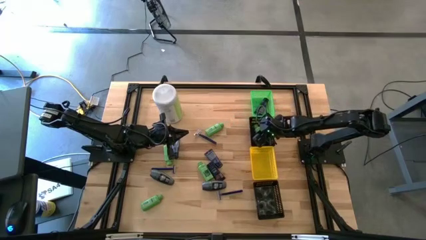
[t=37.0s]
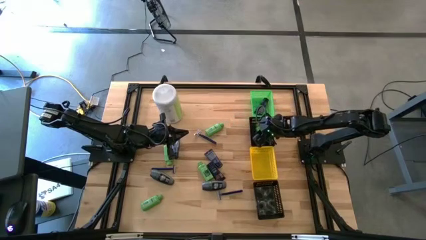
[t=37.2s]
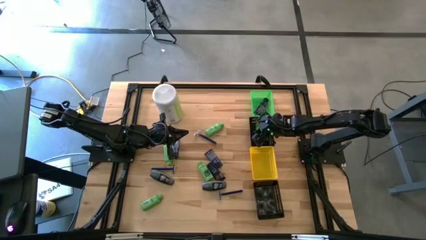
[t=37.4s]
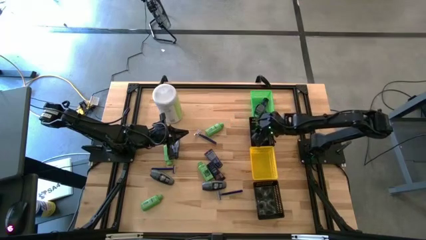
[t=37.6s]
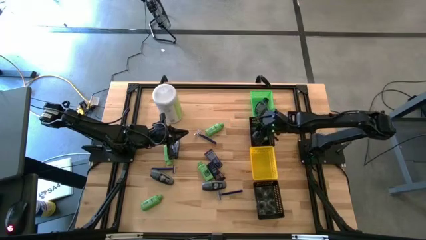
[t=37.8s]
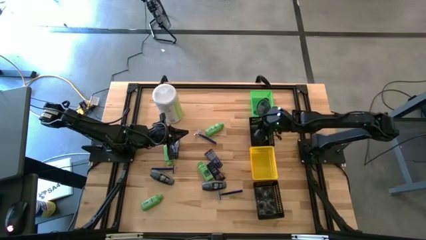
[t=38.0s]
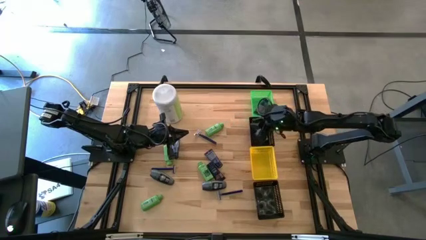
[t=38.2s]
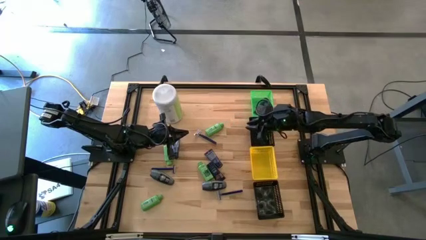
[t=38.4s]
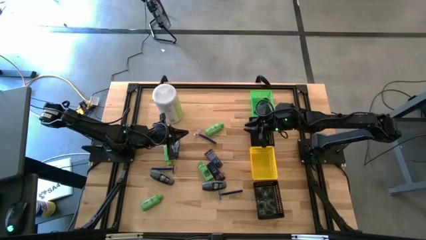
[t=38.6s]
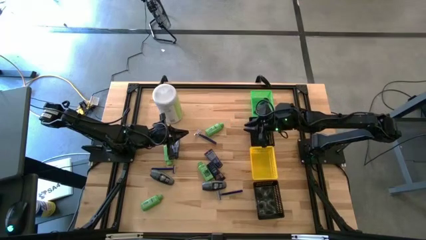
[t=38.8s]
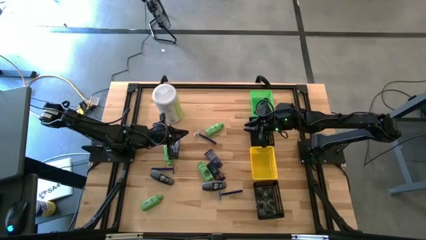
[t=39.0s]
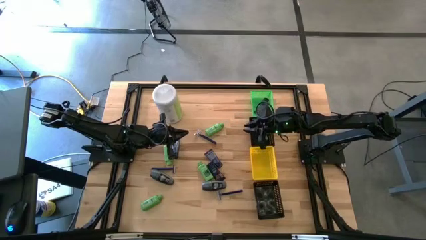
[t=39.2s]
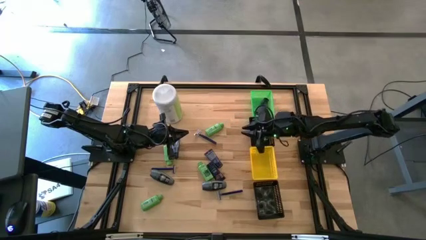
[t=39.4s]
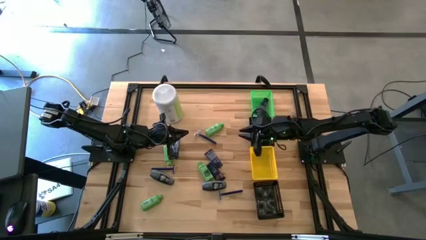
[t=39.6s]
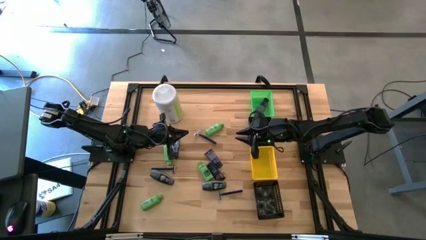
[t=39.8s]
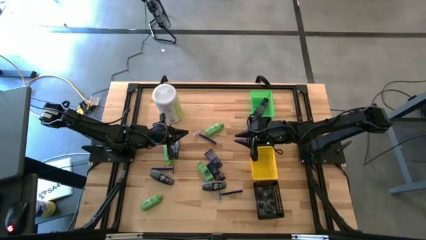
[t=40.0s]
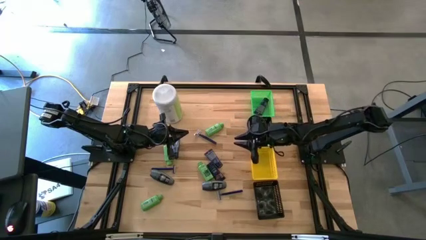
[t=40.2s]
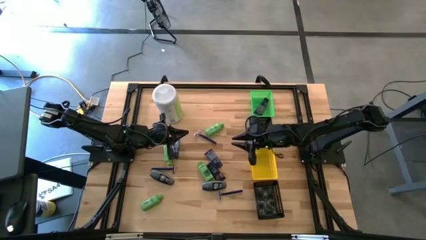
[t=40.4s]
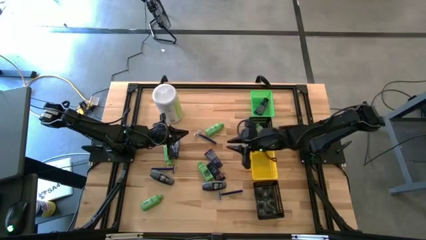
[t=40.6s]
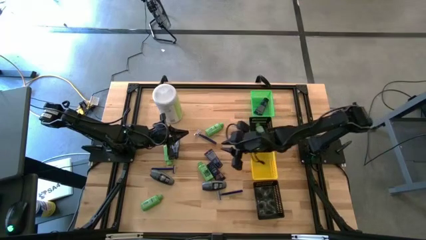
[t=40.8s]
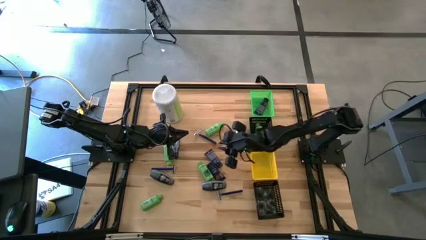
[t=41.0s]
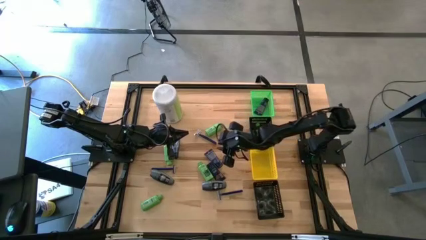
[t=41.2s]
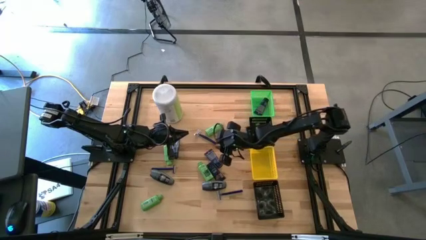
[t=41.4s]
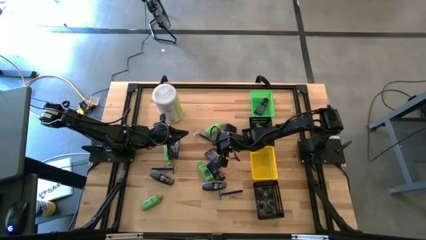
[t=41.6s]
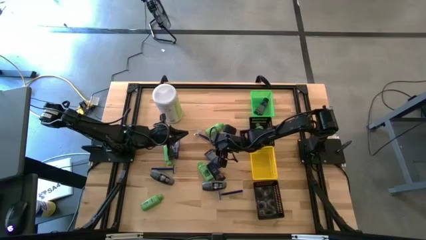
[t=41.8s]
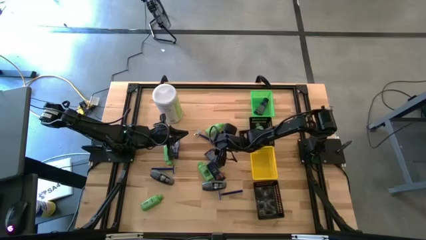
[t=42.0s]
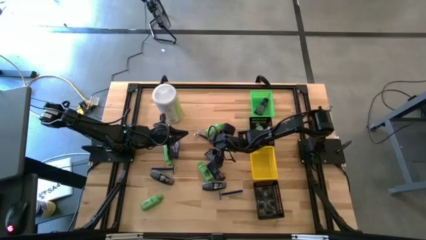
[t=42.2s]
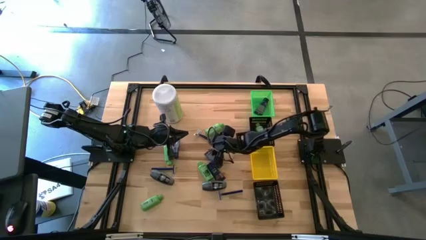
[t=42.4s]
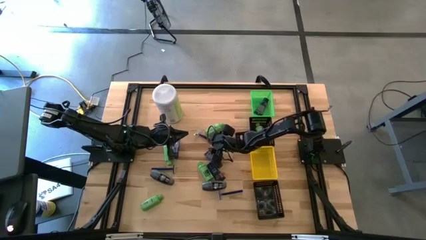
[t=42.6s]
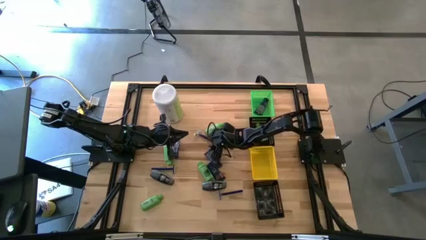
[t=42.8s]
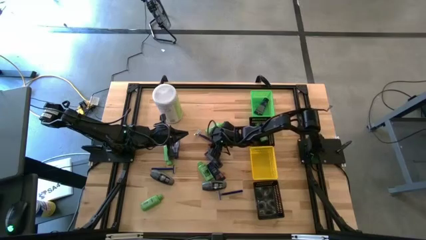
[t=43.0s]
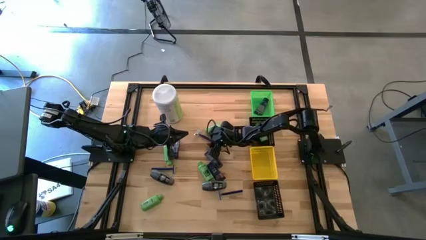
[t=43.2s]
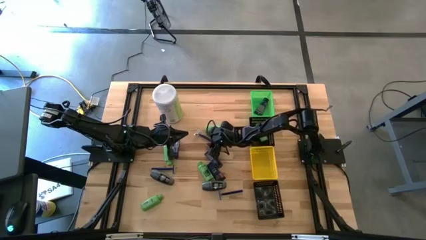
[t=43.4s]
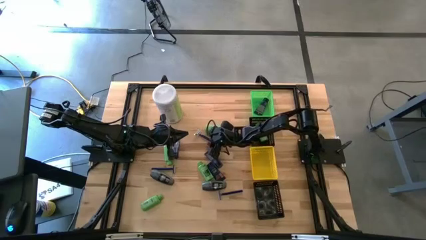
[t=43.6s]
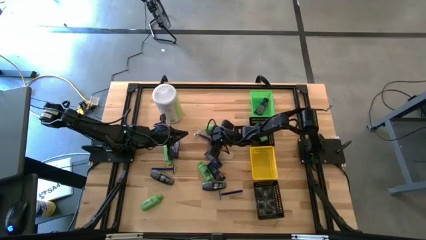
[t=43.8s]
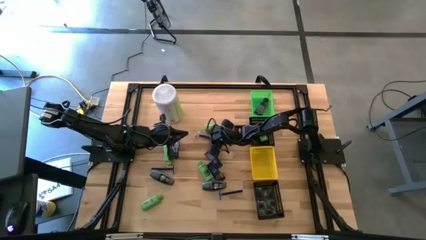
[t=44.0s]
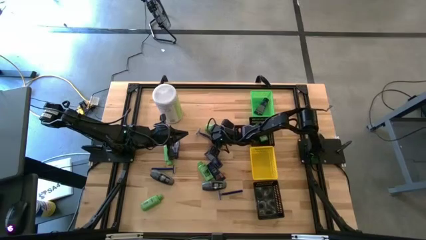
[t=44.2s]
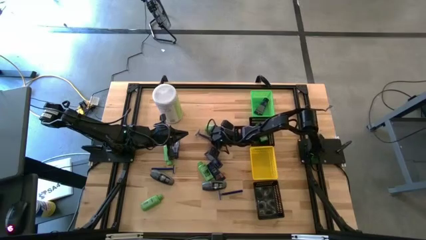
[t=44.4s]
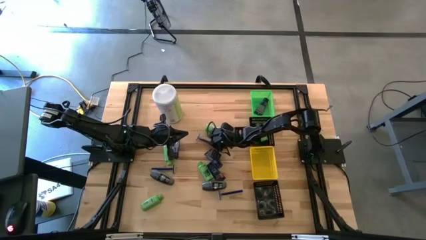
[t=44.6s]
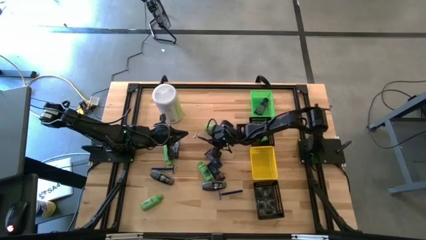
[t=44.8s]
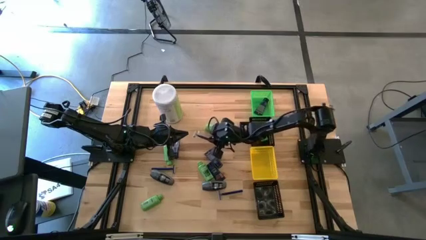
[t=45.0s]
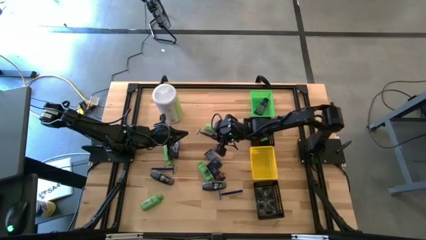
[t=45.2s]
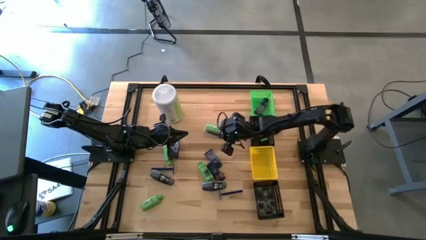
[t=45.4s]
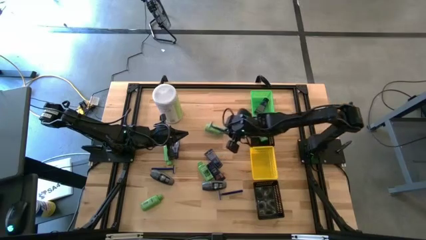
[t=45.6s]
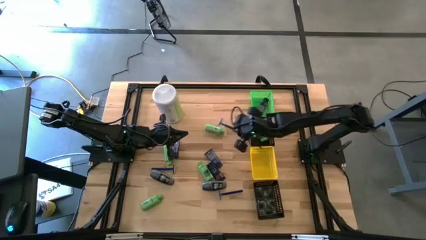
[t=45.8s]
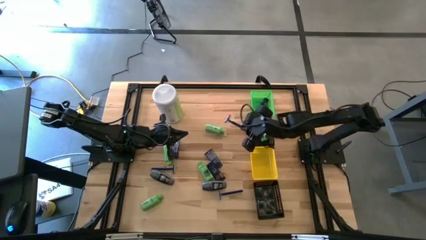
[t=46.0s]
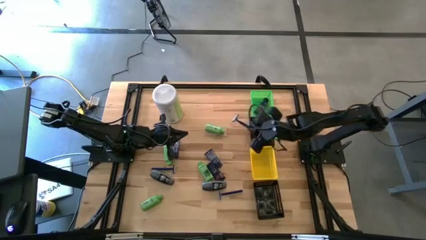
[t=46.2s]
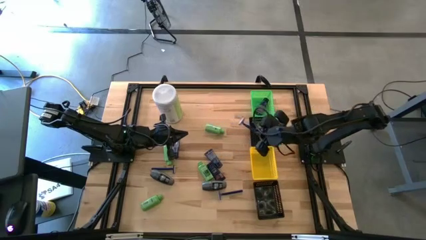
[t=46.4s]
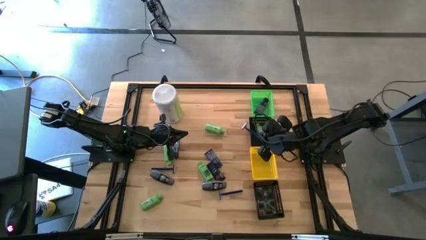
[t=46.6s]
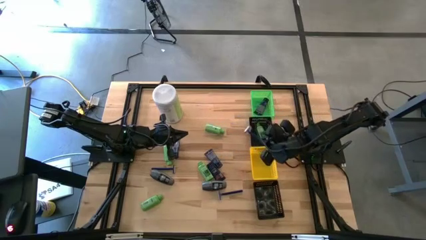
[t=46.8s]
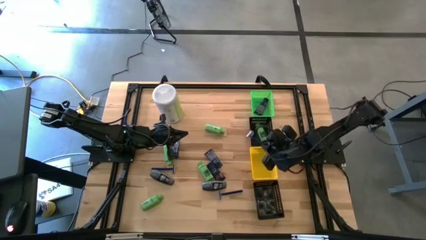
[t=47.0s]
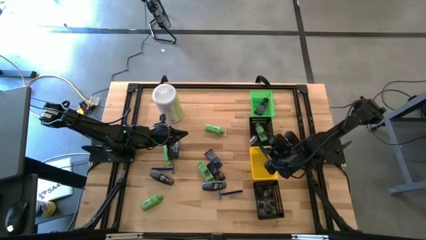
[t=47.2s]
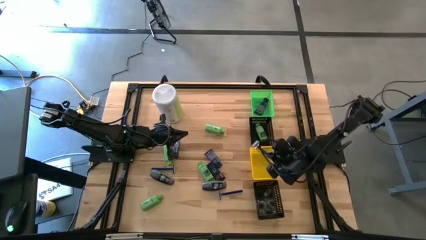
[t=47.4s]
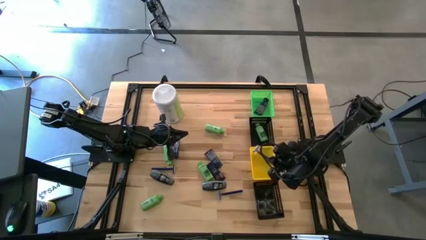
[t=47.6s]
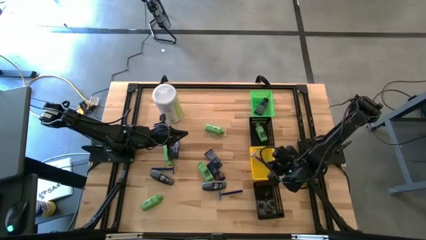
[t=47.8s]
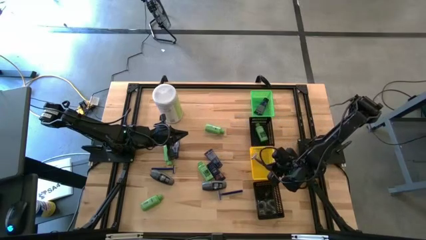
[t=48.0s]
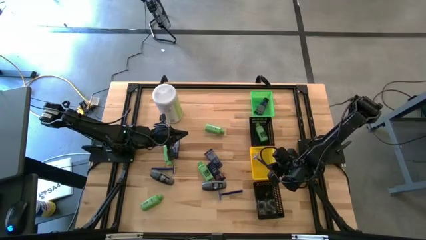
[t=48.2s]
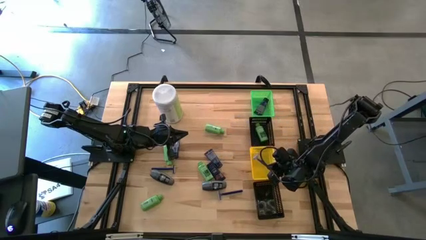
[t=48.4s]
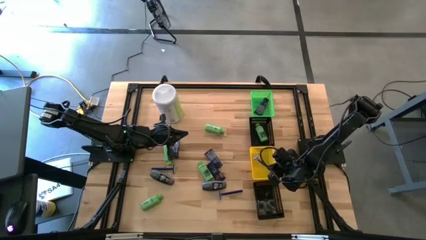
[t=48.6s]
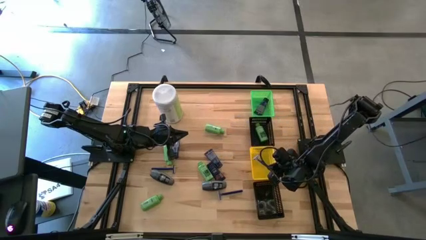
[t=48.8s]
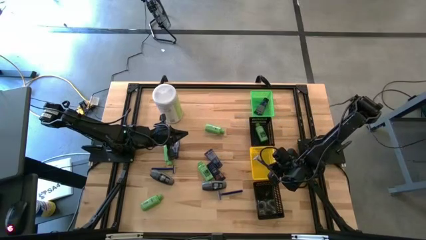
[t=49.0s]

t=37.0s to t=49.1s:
Task: Pick & Place Travel size toiletries
Put the blue razor into the yellow basket

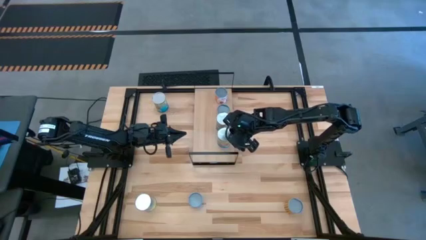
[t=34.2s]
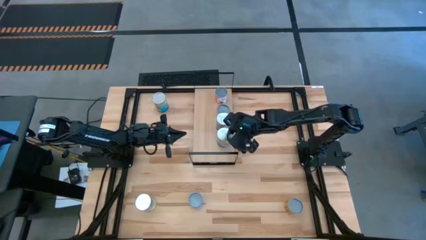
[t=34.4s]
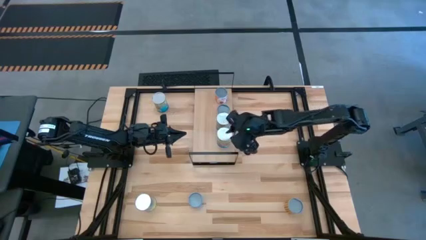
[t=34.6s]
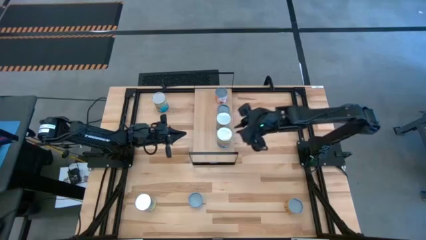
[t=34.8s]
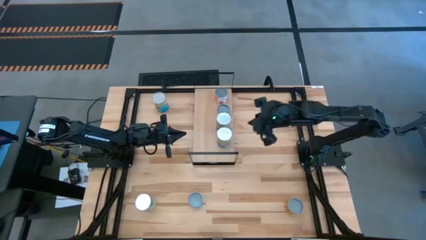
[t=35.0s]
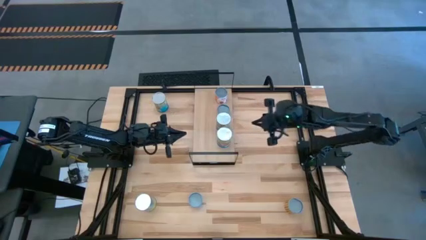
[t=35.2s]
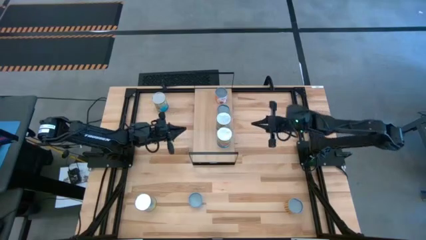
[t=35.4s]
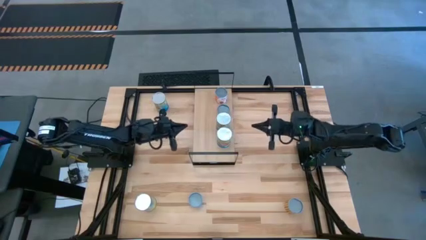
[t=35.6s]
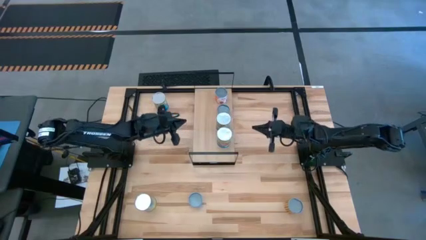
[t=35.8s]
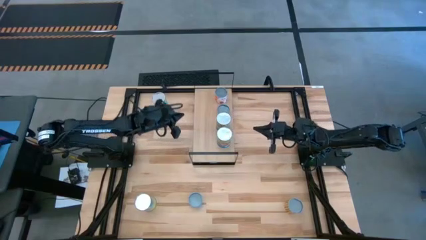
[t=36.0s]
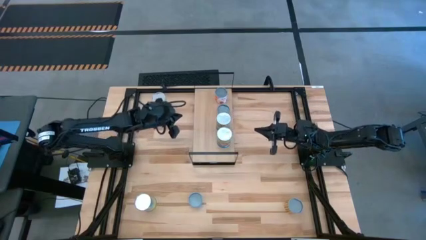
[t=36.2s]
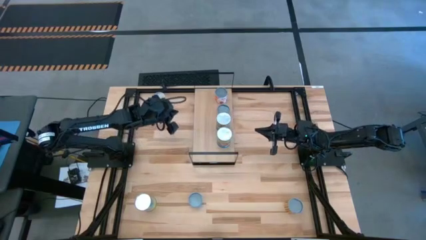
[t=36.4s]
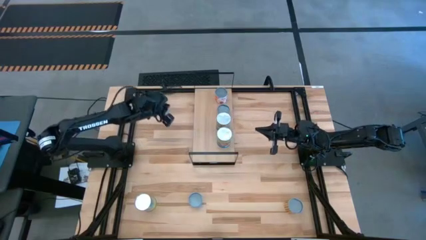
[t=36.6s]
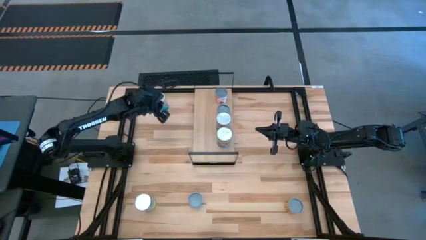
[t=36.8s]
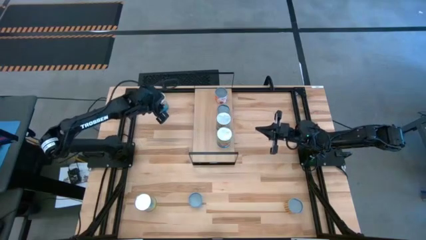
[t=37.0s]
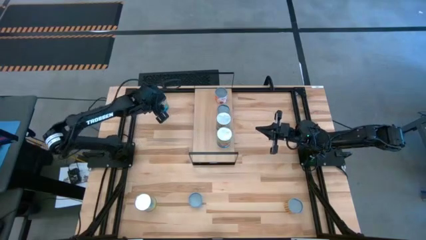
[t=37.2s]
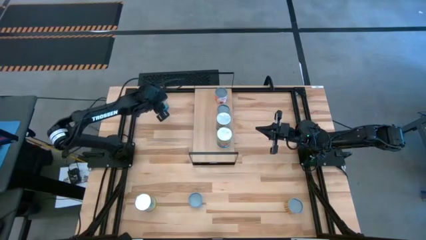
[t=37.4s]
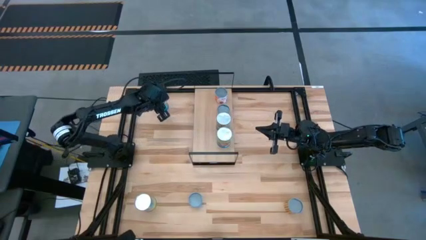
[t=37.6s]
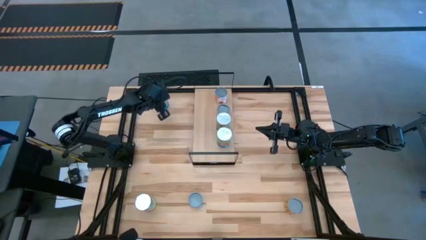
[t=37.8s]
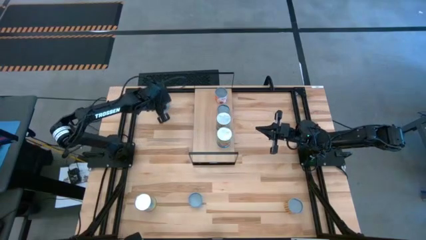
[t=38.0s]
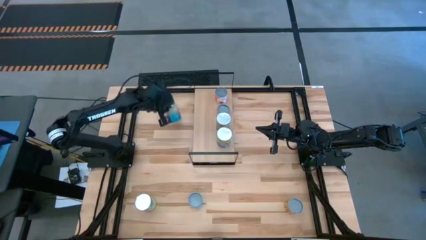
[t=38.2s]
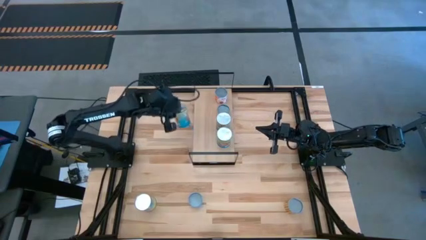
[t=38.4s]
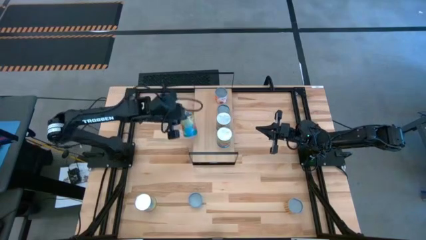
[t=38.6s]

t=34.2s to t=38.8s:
Task: Pick and place cans onto a shelf
Put the canned tomatoes on the shelf and align them with the other tomato cans
